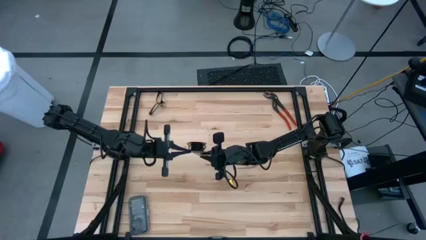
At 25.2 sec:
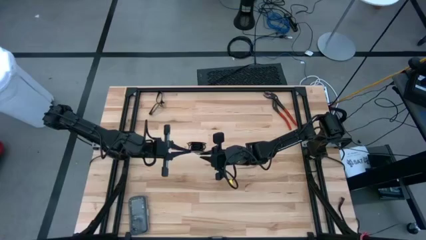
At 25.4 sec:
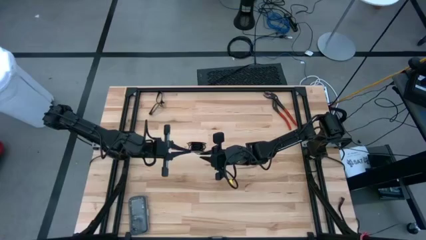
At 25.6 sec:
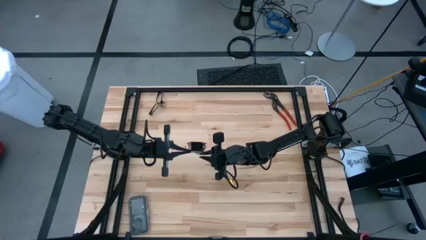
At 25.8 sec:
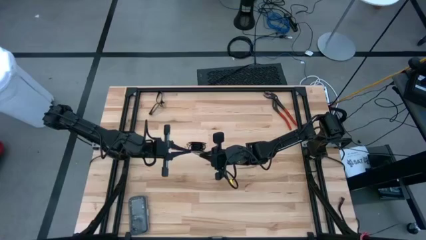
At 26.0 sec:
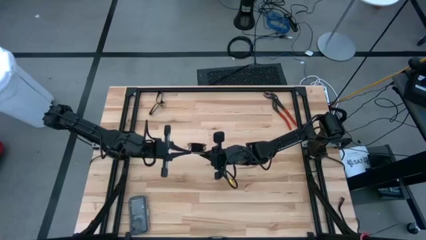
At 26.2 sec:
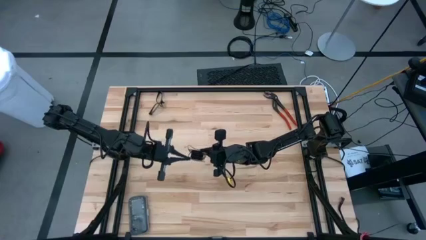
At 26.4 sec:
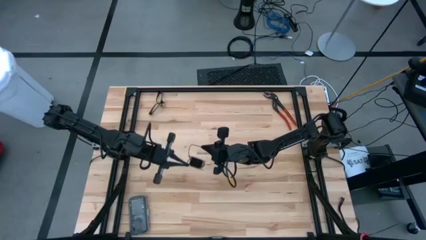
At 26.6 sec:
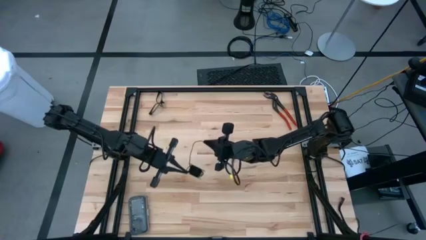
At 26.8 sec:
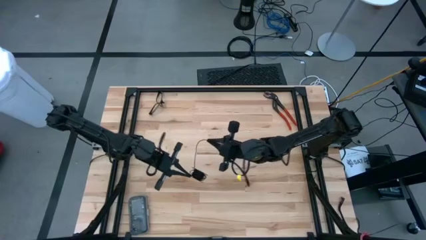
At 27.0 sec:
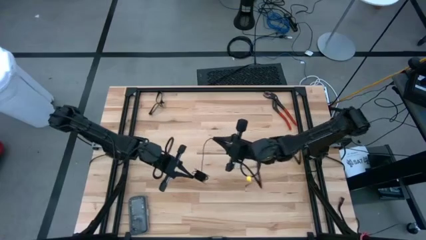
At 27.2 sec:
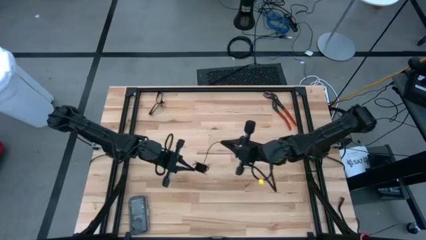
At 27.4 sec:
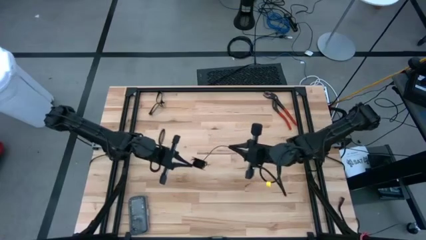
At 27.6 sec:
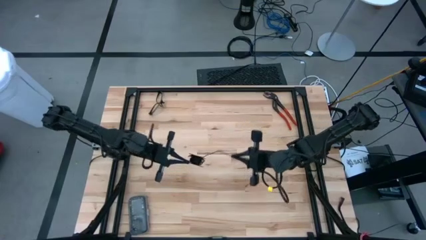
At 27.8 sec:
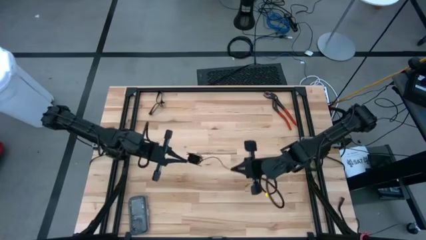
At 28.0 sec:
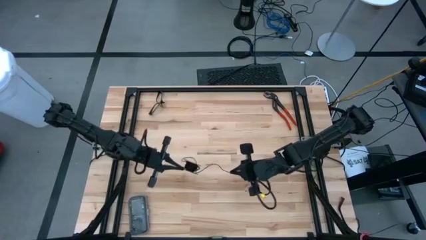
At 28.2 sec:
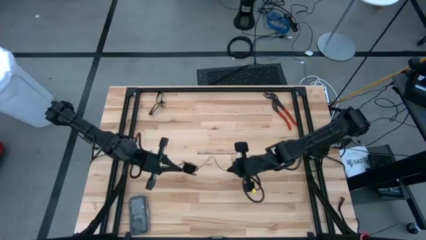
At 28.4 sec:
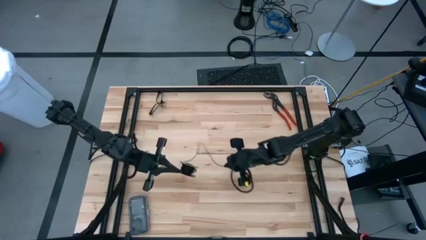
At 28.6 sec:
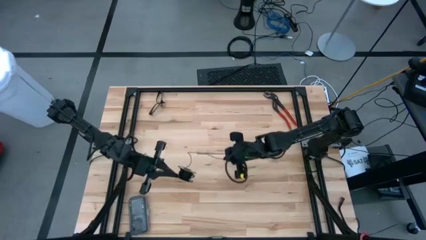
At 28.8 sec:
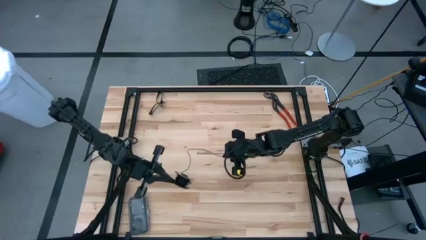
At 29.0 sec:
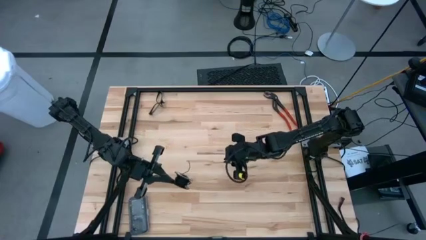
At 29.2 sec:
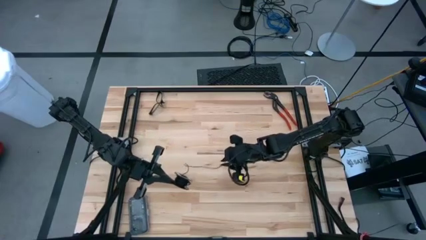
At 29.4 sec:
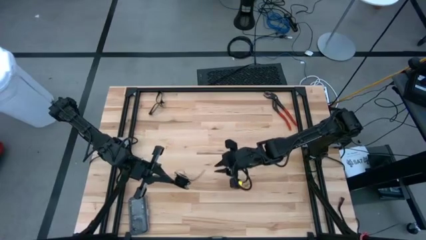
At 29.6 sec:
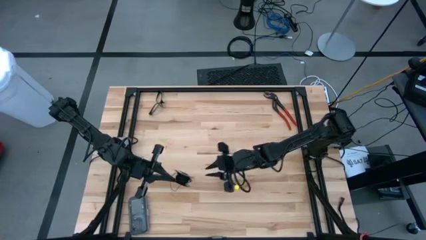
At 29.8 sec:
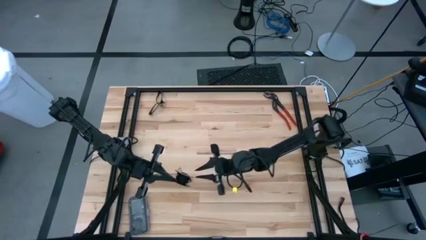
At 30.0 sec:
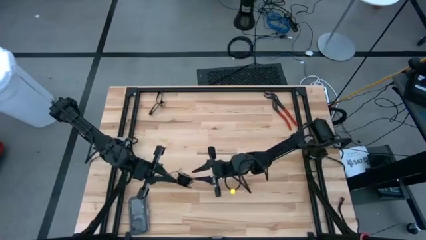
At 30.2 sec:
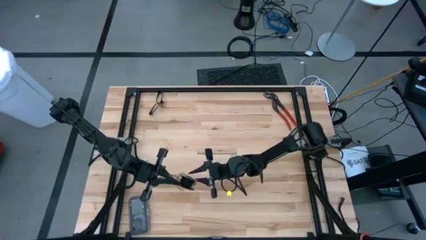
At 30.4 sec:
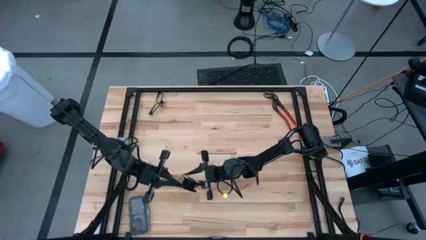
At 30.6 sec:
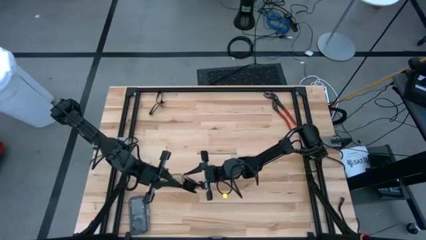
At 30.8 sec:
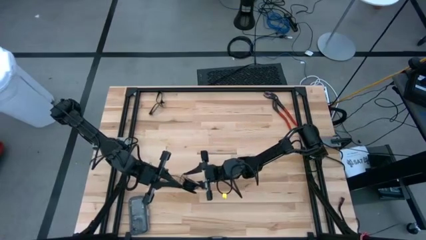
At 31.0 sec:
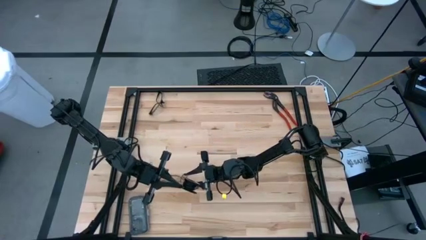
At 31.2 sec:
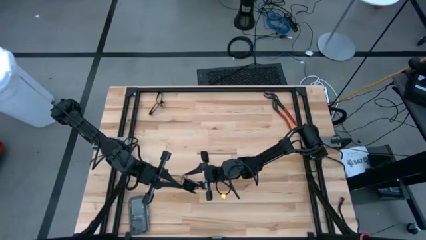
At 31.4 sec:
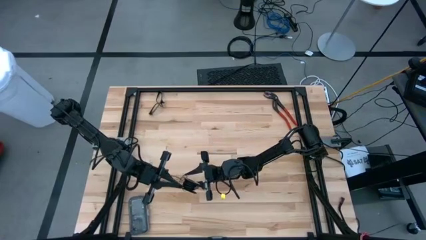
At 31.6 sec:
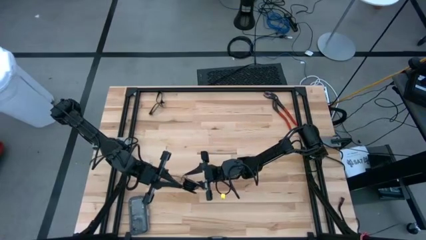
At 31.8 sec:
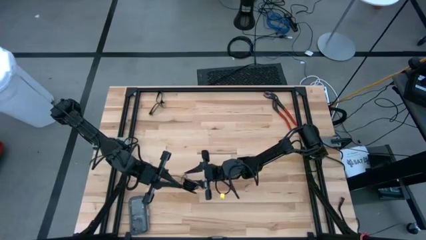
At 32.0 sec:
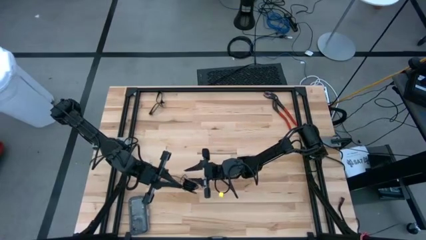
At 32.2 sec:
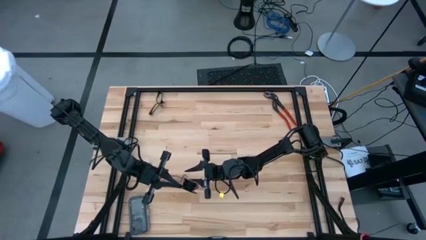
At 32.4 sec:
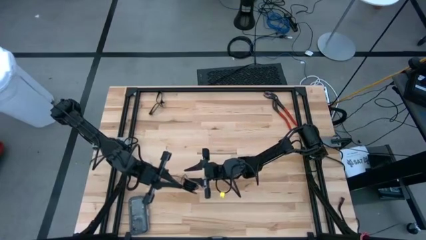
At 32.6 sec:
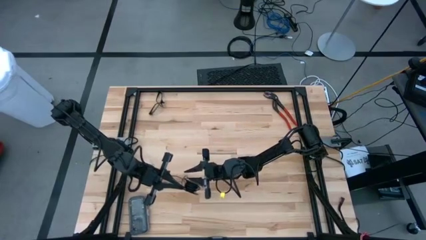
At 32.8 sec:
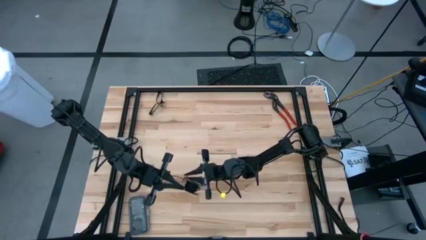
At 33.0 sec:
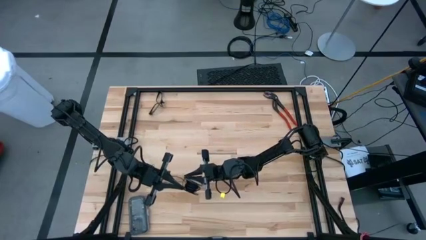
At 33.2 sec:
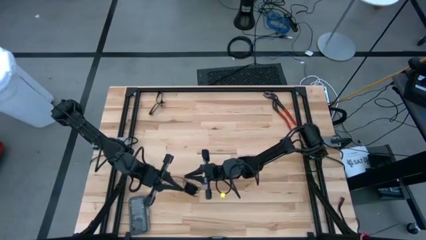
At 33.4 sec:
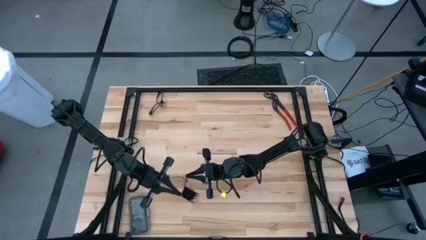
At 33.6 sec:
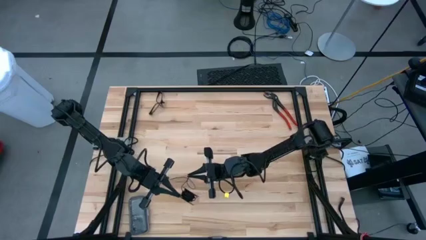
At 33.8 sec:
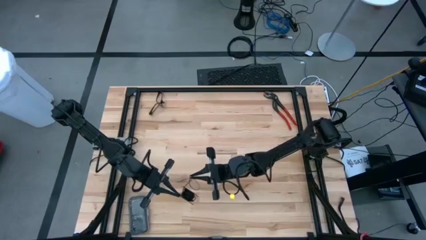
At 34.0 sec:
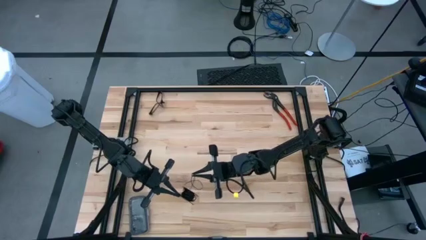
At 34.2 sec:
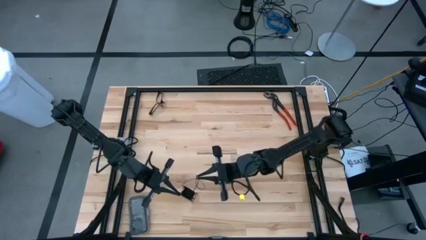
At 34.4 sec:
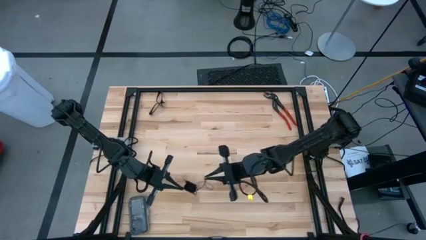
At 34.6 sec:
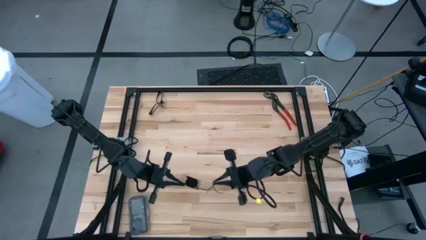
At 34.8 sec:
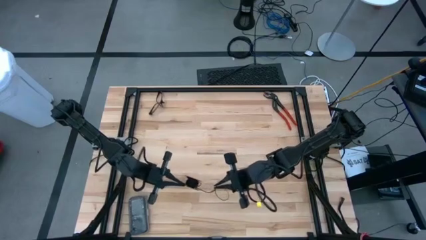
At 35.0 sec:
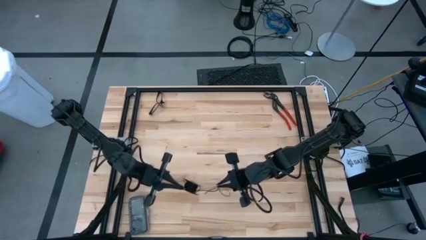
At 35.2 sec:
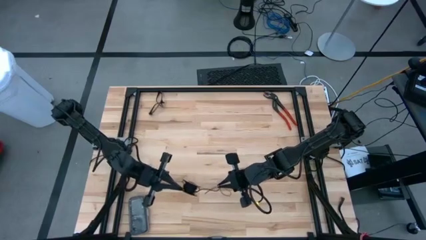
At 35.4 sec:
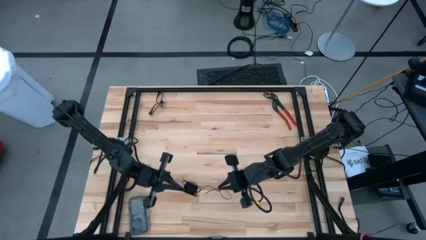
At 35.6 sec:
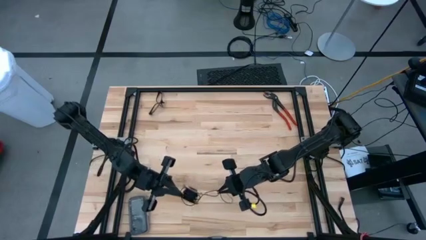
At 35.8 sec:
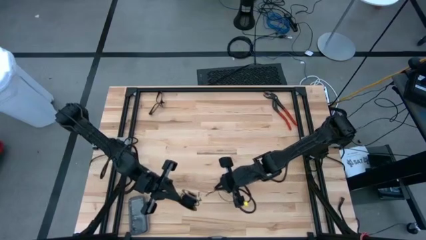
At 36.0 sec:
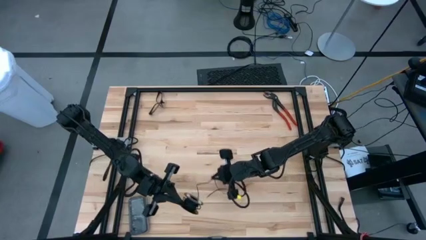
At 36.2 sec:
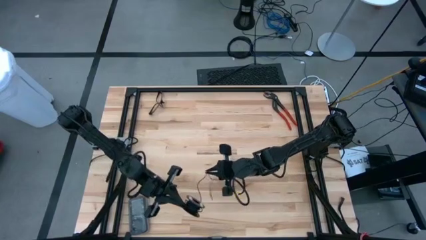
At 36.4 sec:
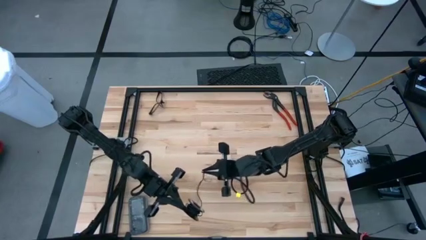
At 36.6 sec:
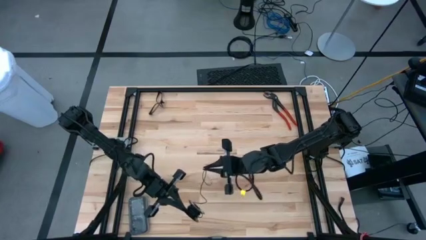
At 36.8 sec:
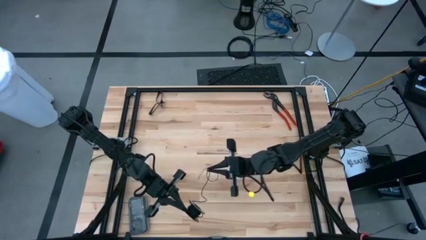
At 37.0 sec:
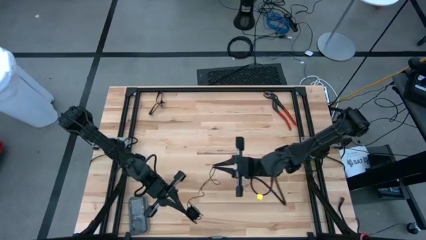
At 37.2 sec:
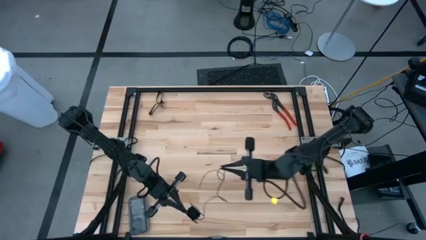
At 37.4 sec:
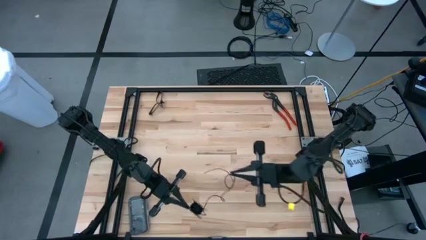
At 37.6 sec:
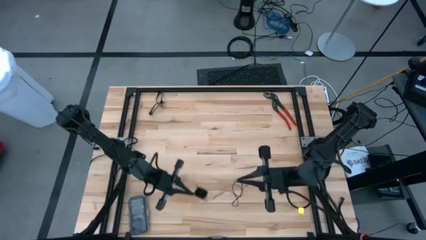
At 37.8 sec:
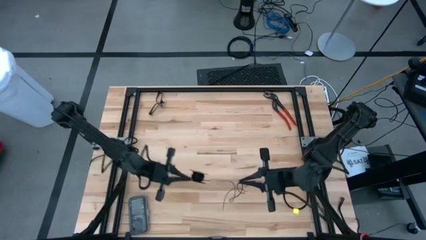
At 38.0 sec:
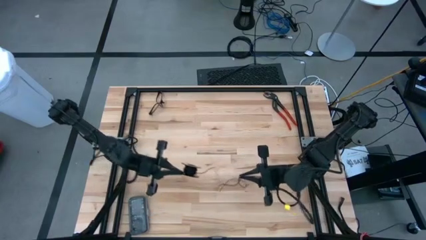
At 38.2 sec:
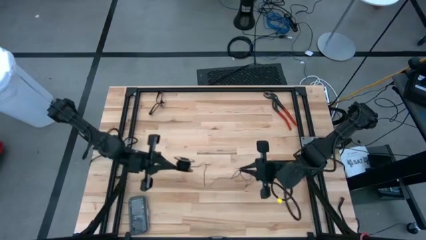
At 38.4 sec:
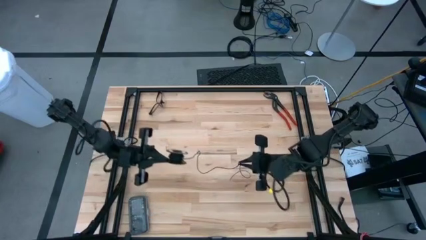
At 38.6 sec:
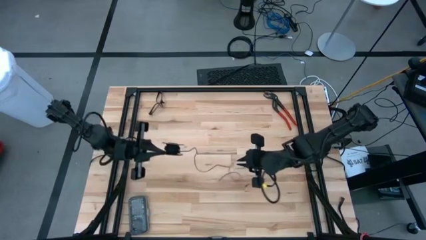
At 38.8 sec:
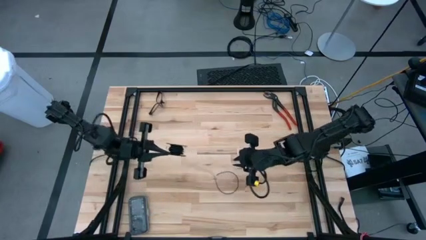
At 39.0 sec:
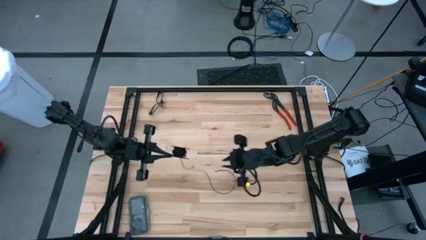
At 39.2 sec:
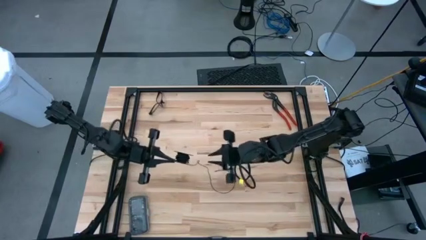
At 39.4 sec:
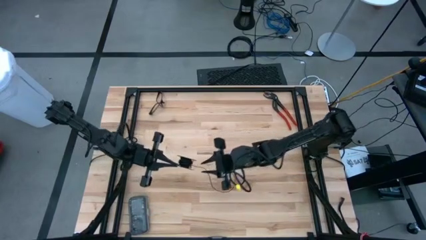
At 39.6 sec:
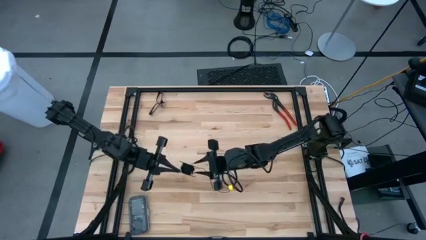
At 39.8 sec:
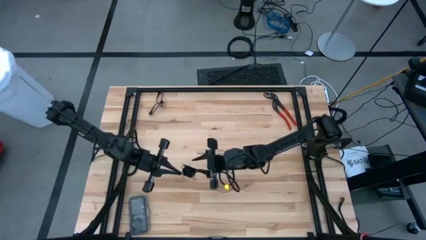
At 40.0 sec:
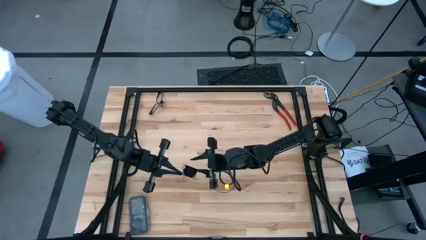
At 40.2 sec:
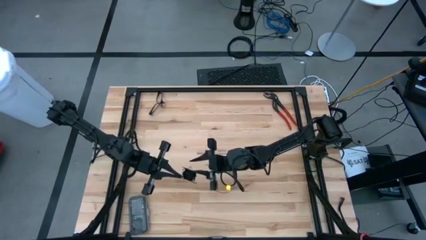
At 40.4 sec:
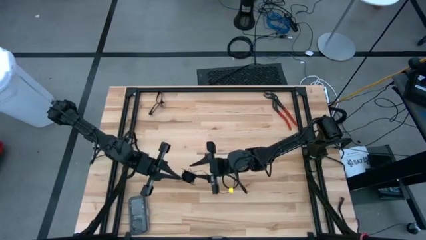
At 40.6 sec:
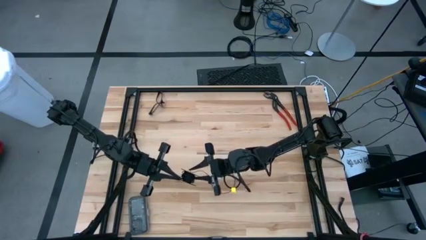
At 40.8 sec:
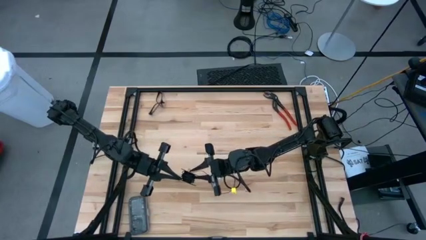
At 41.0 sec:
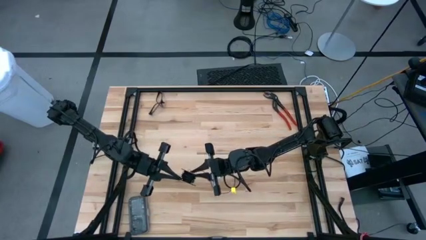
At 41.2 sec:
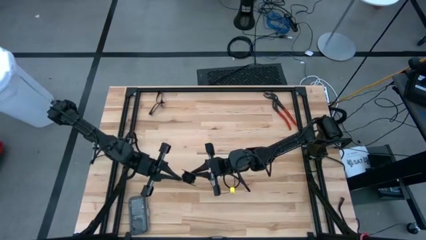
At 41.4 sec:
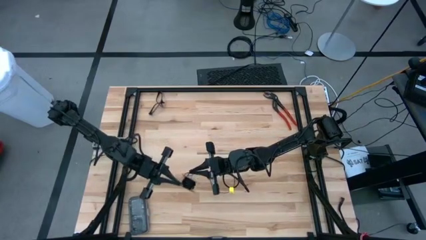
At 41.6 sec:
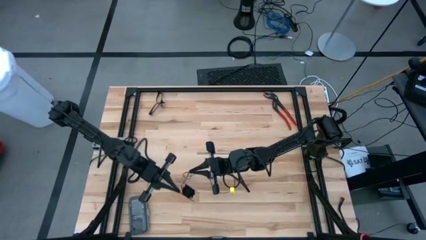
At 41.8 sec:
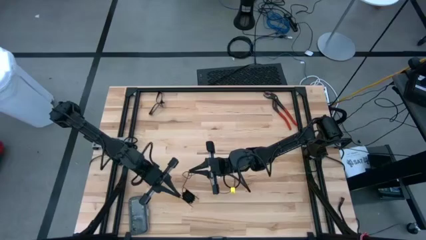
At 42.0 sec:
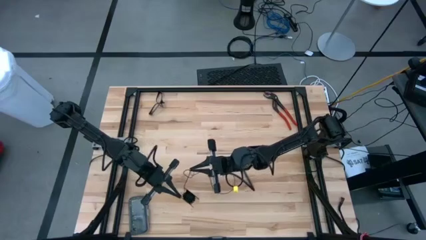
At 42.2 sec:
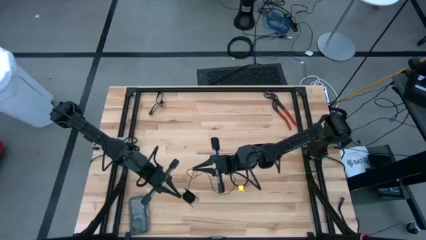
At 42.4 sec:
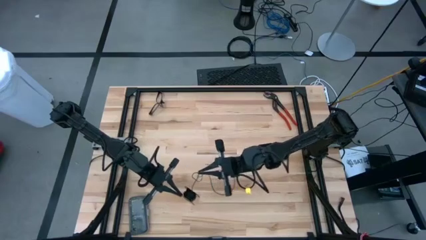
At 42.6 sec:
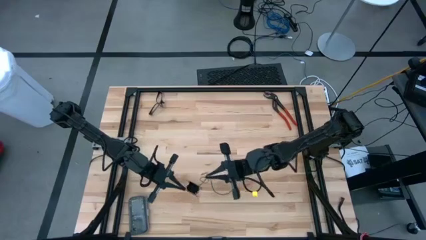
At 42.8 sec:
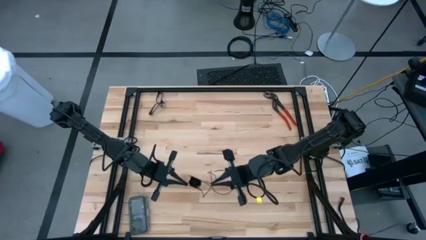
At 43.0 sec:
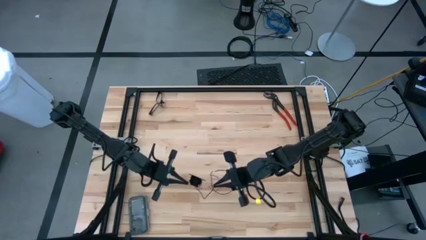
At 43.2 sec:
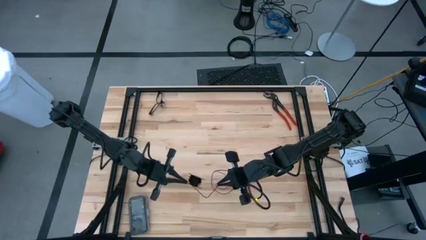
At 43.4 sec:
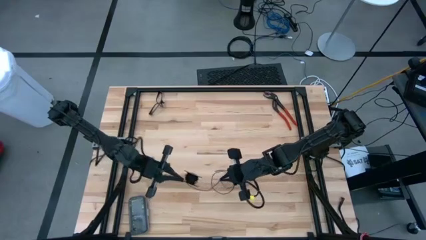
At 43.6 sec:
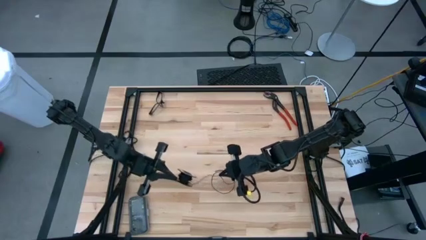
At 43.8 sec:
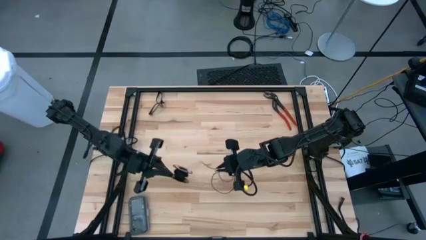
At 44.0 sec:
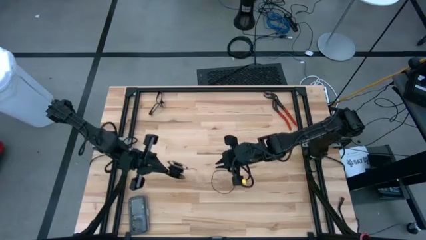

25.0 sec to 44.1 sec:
Task: Coil cords
Uncoil the black cable wire from the spool
